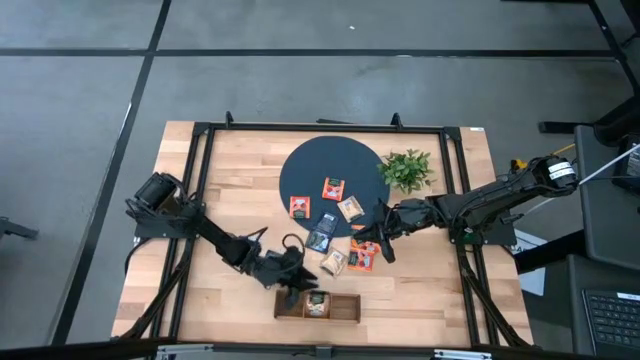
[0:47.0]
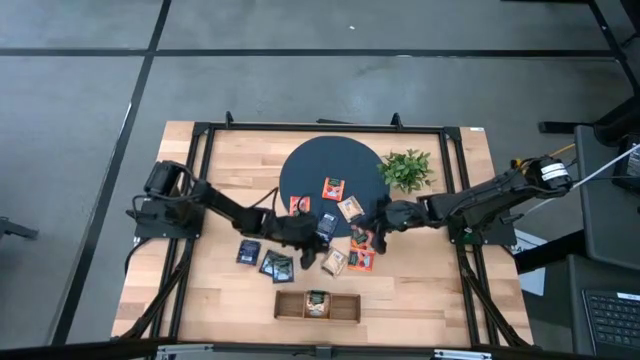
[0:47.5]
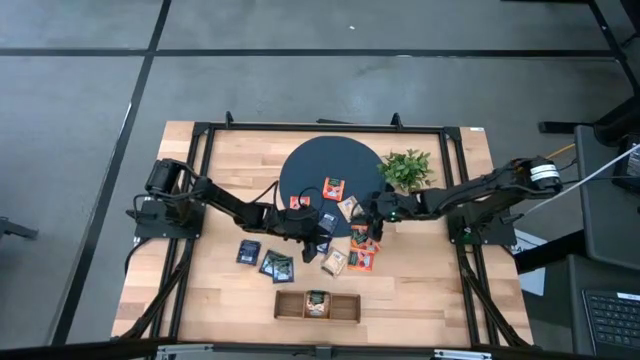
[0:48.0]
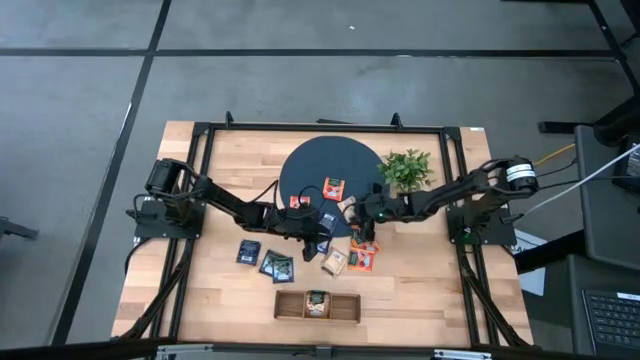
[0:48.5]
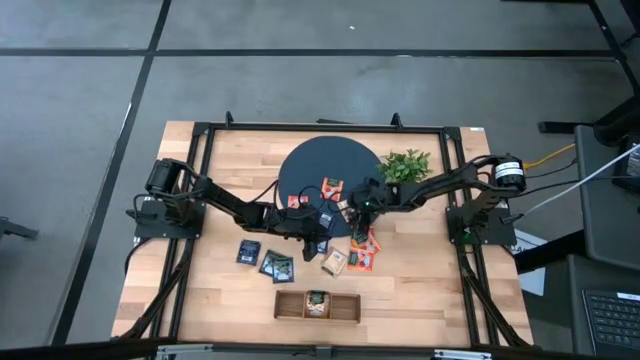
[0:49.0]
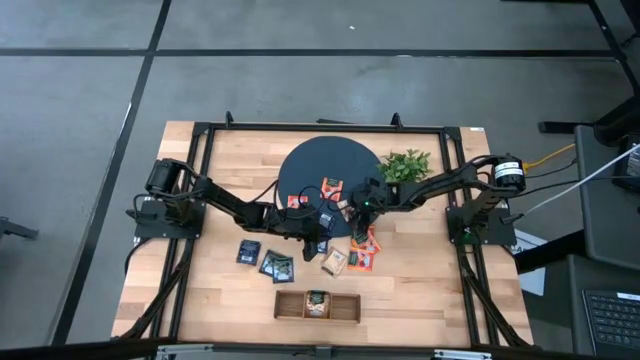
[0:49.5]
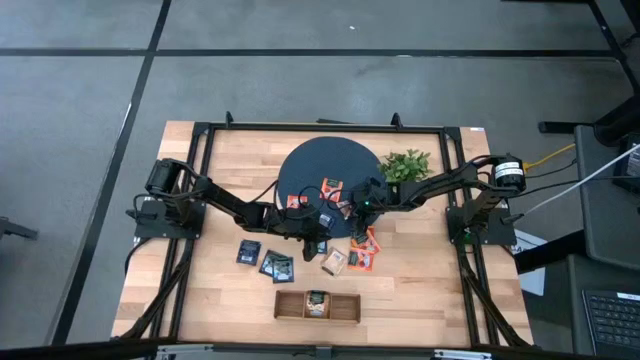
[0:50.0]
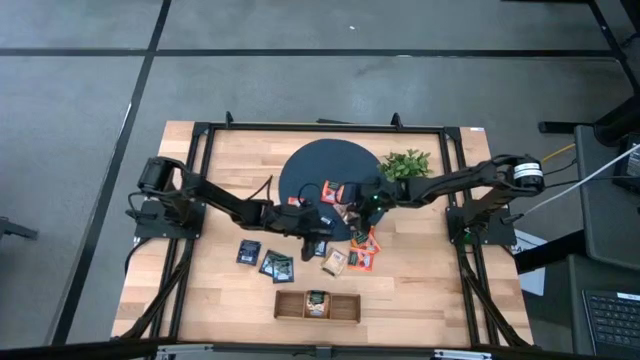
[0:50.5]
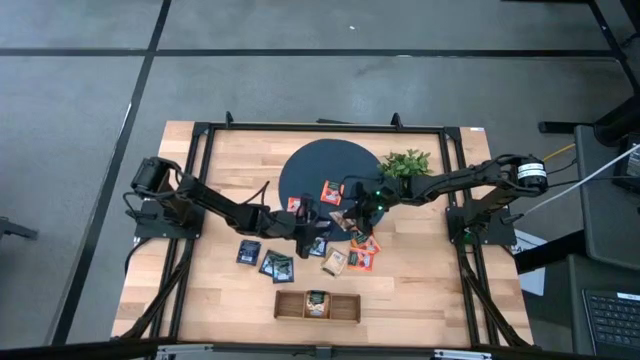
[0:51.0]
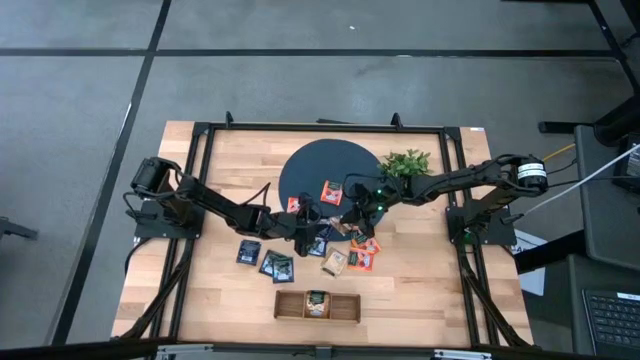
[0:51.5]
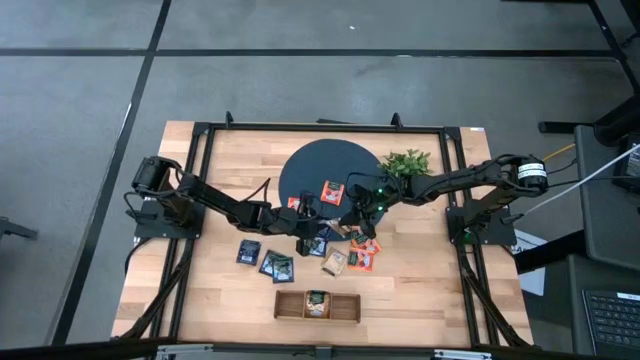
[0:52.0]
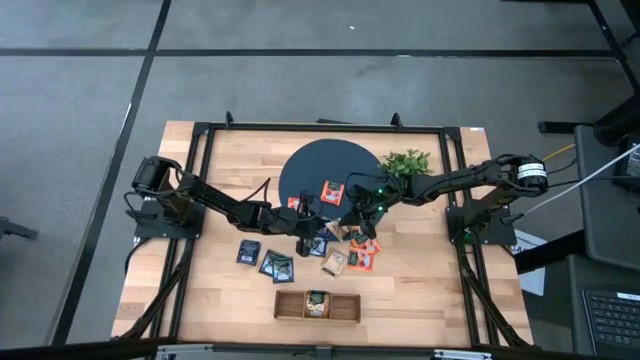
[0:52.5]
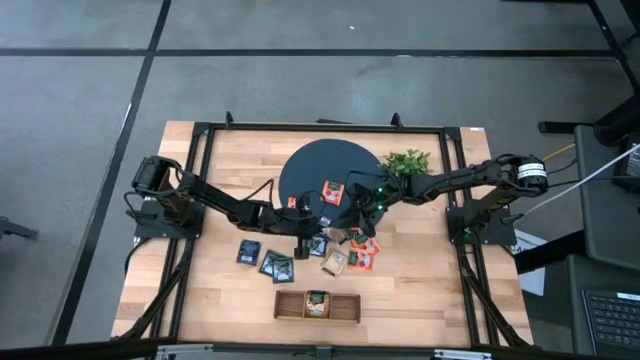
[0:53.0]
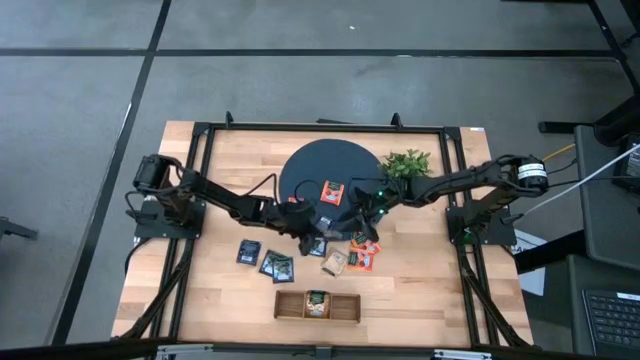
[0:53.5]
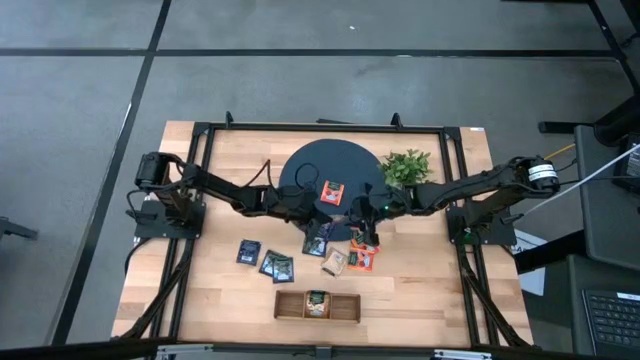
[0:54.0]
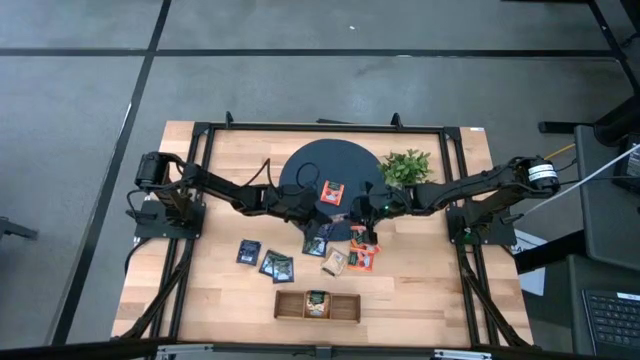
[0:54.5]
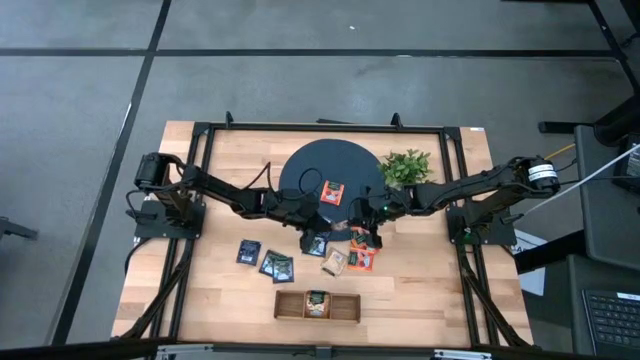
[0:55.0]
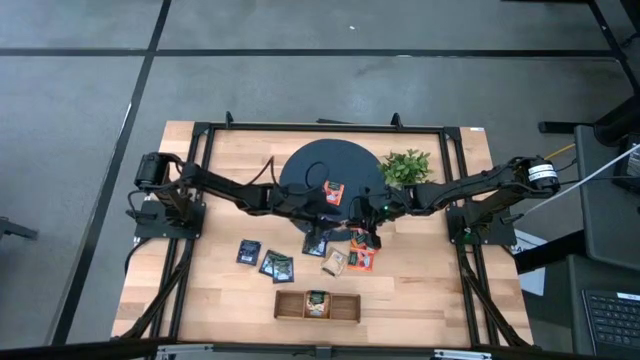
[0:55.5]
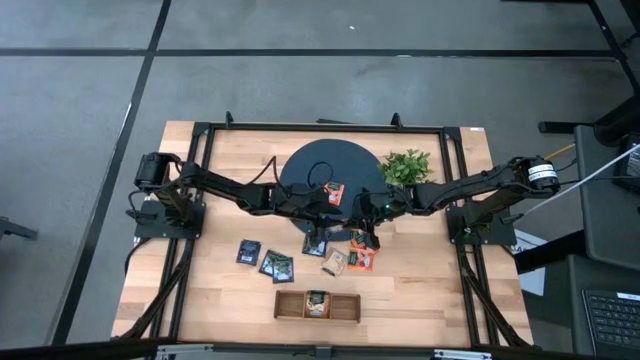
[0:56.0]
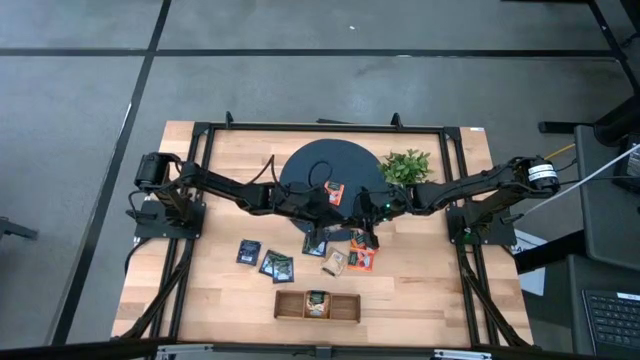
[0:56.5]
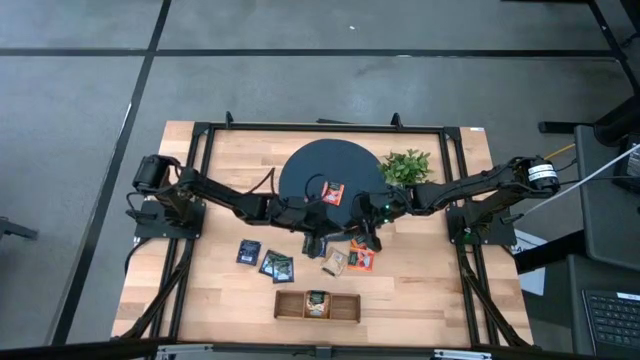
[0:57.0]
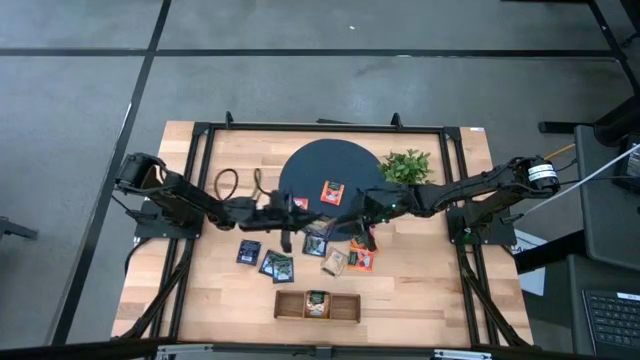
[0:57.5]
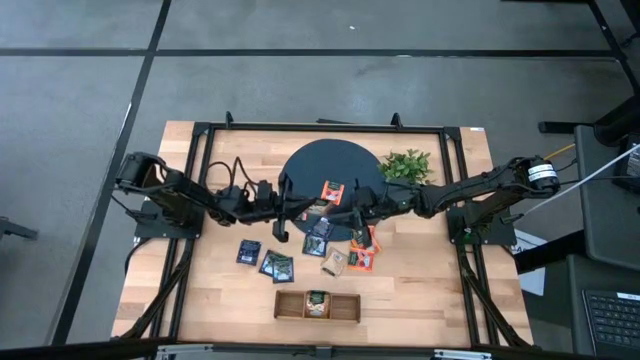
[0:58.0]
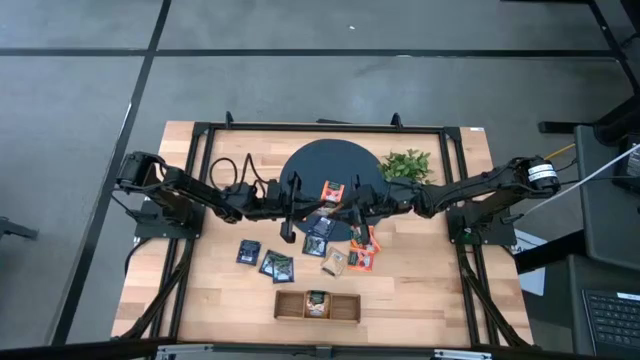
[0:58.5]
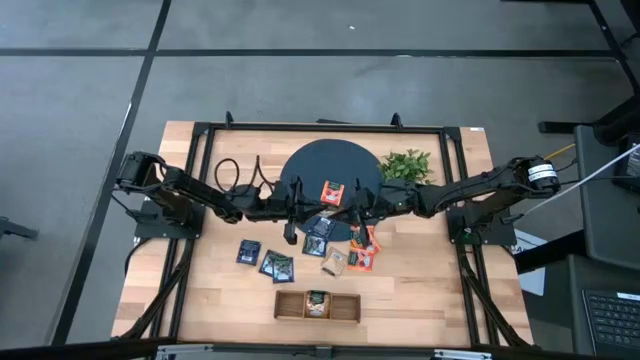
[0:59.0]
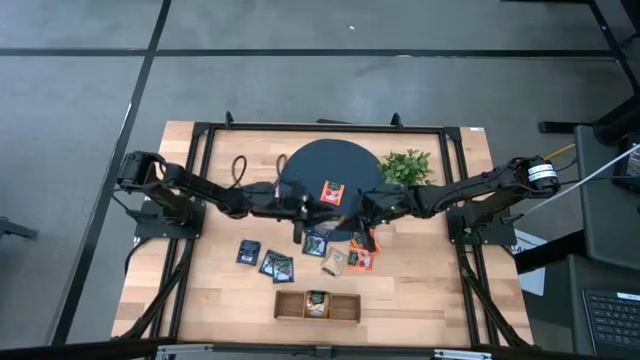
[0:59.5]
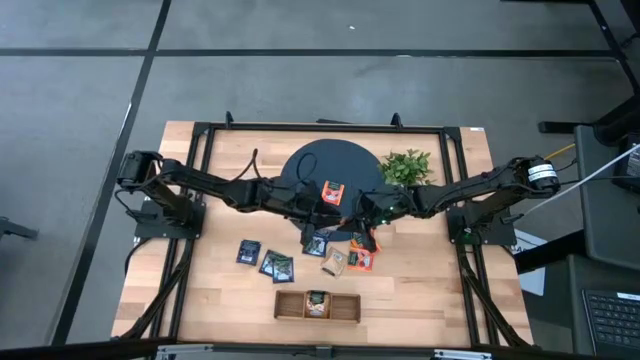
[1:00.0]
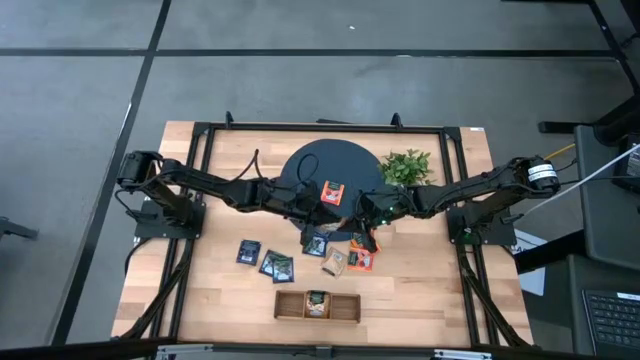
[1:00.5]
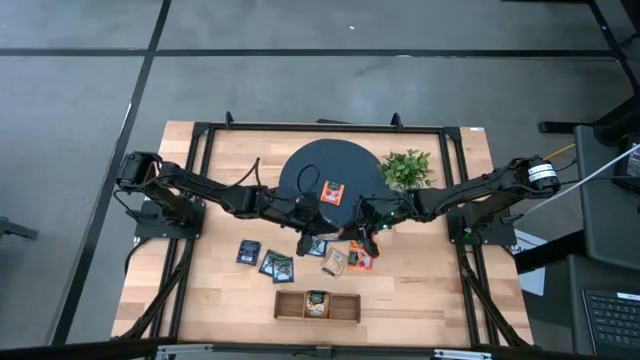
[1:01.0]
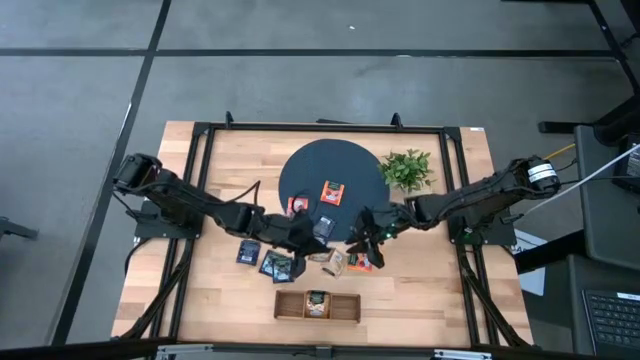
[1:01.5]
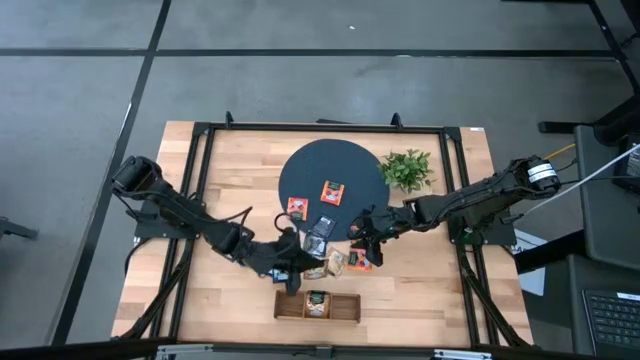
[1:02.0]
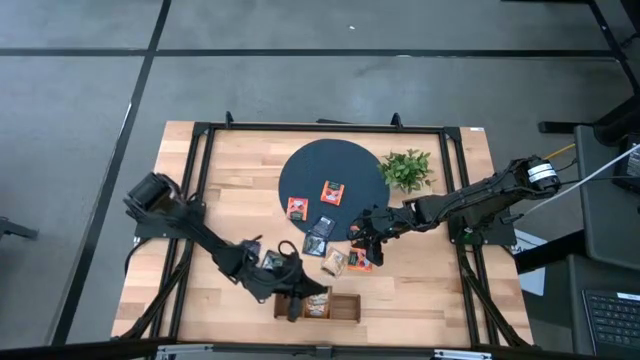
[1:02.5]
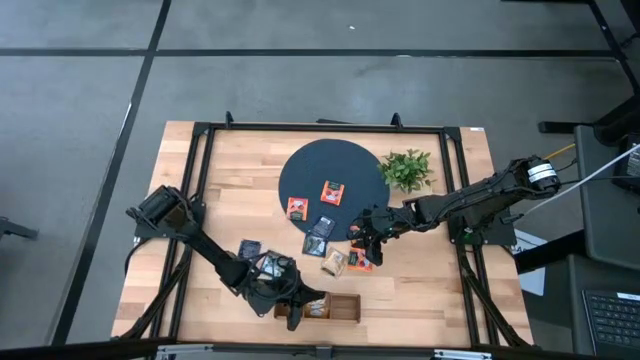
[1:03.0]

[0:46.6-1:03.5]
Task: Pick & Place Tea
Put the brown tea bag into the middle section of the wooden organizer
